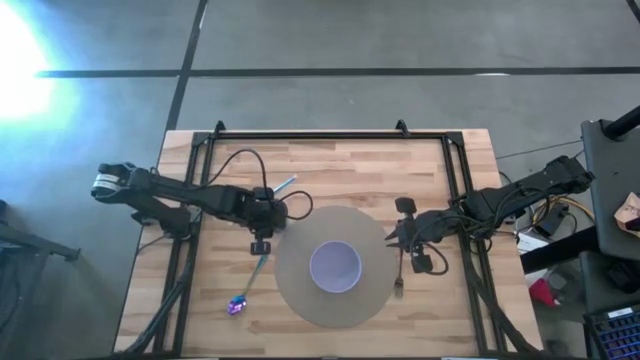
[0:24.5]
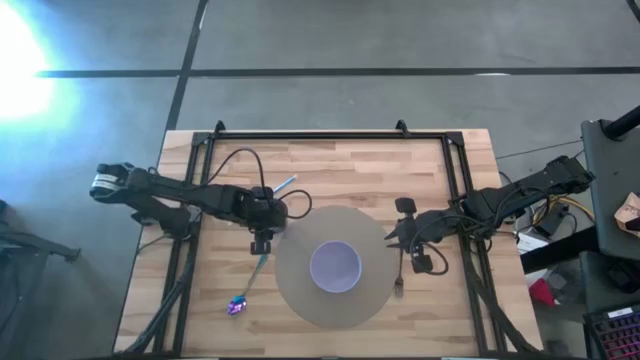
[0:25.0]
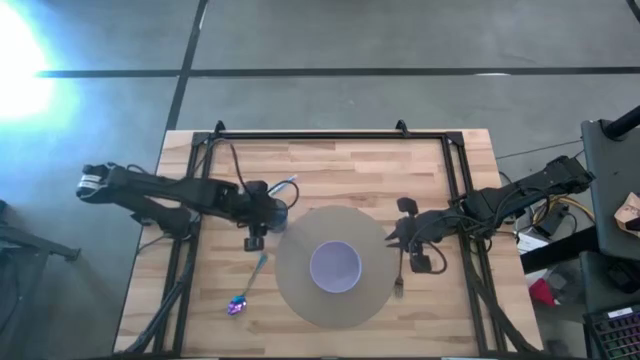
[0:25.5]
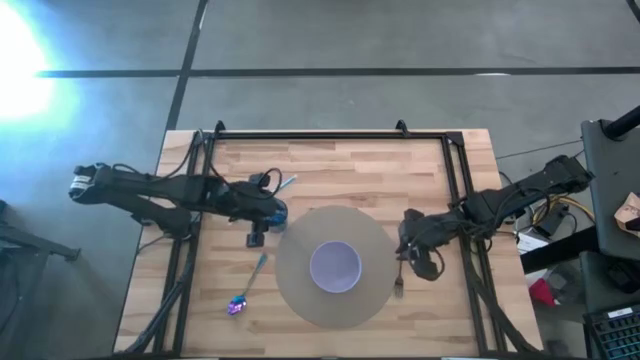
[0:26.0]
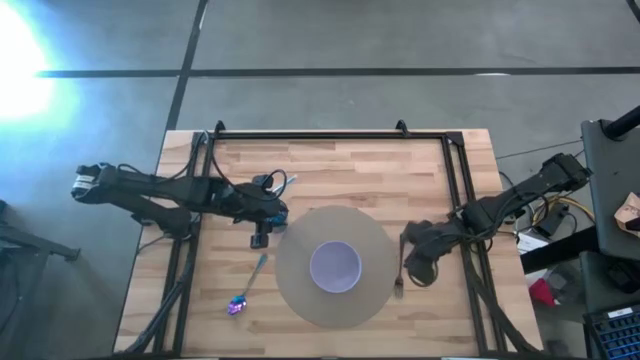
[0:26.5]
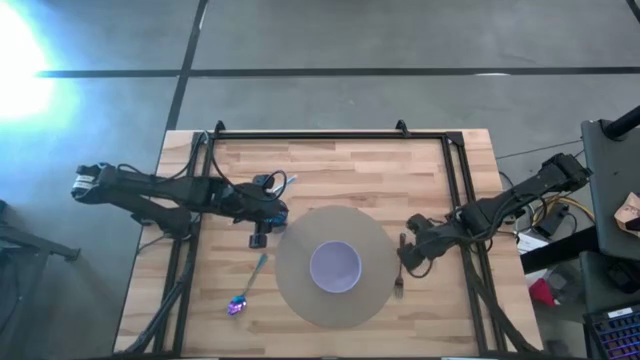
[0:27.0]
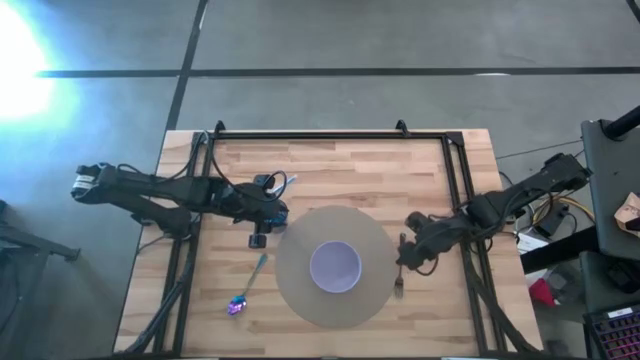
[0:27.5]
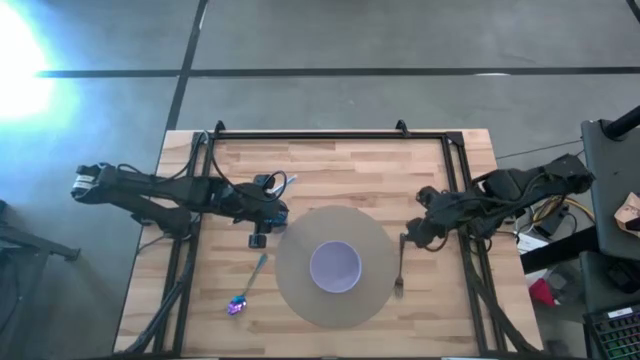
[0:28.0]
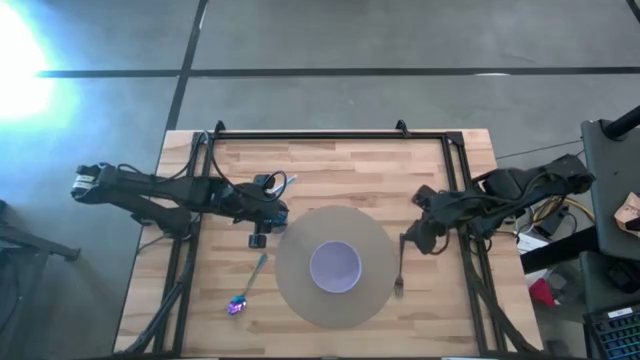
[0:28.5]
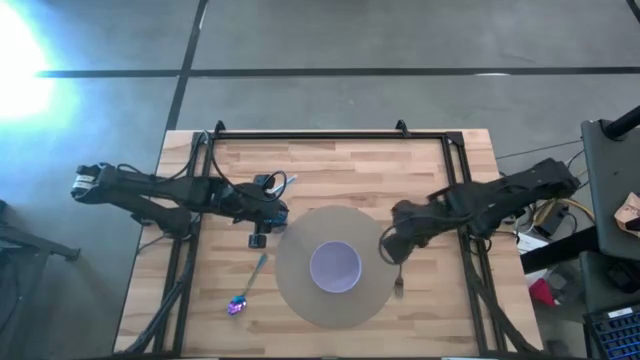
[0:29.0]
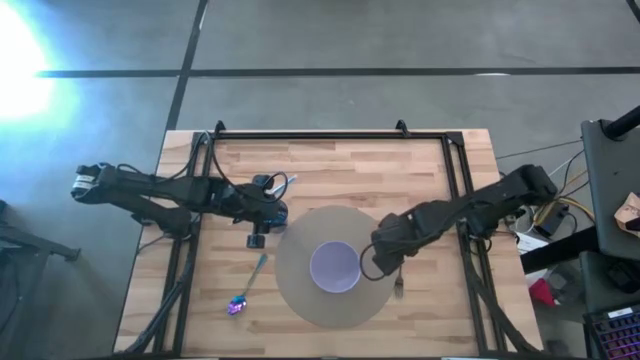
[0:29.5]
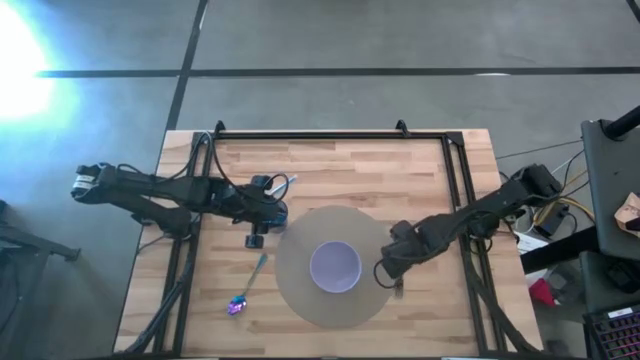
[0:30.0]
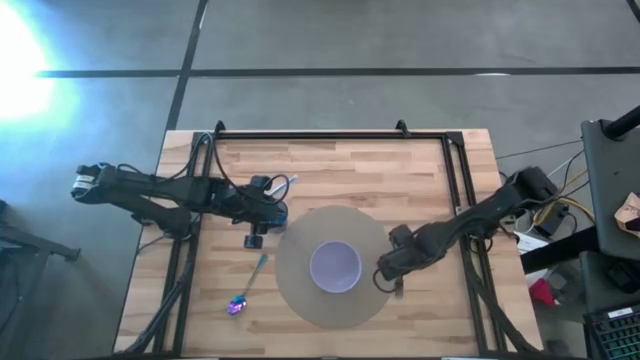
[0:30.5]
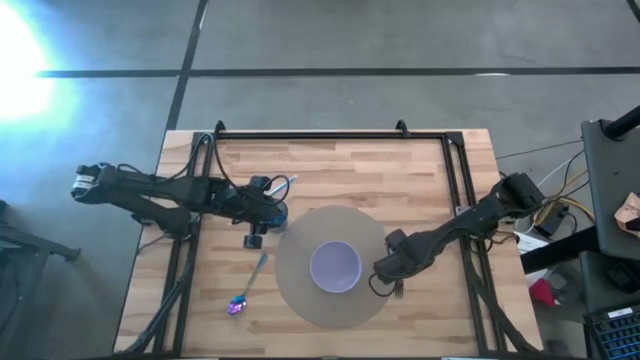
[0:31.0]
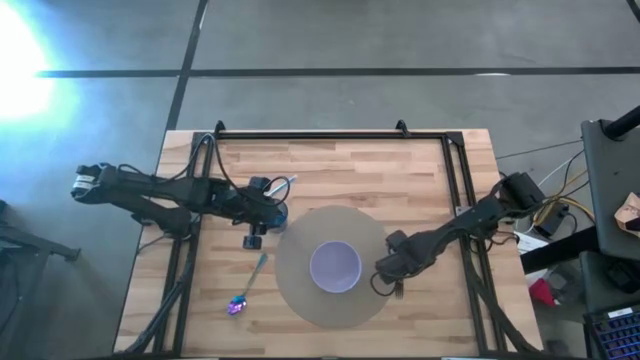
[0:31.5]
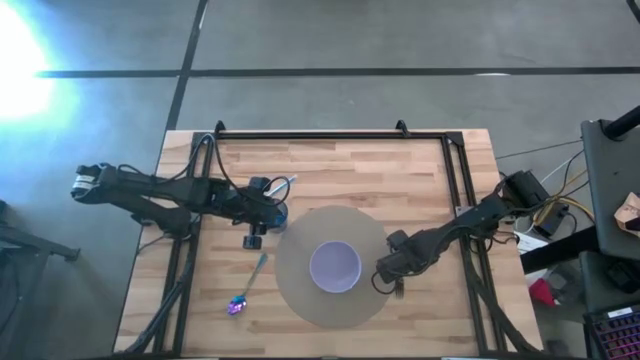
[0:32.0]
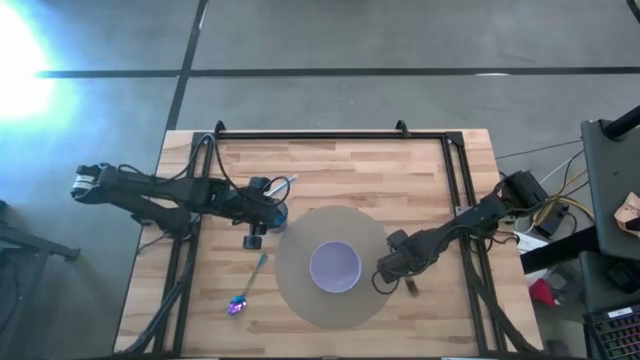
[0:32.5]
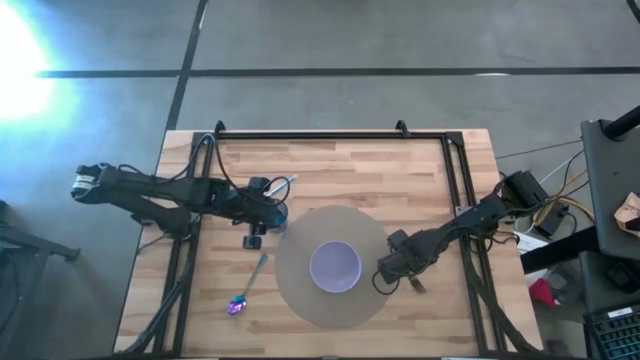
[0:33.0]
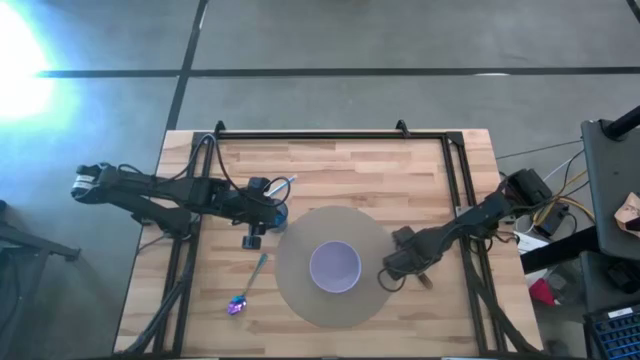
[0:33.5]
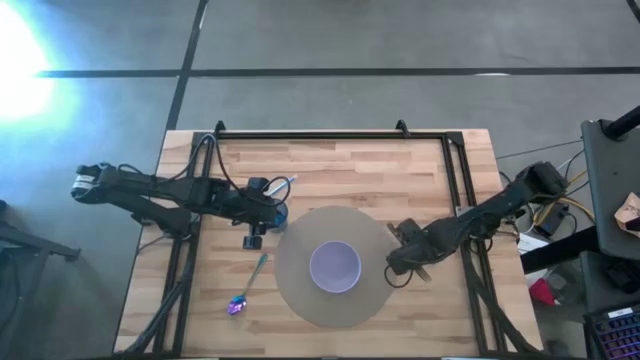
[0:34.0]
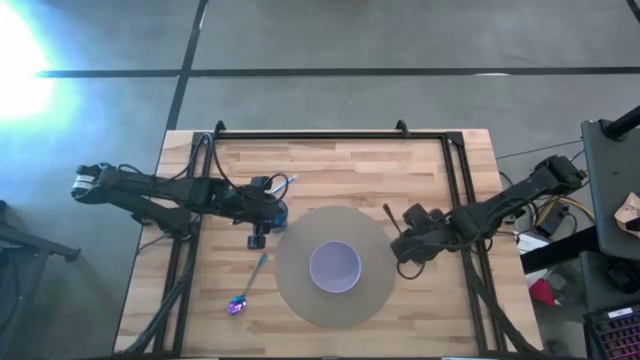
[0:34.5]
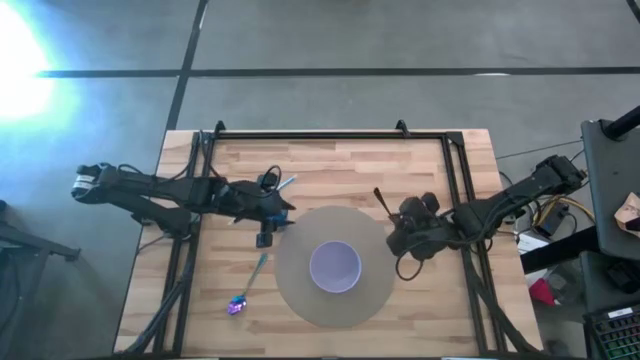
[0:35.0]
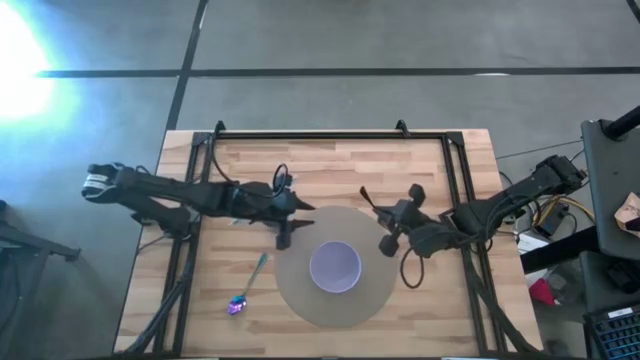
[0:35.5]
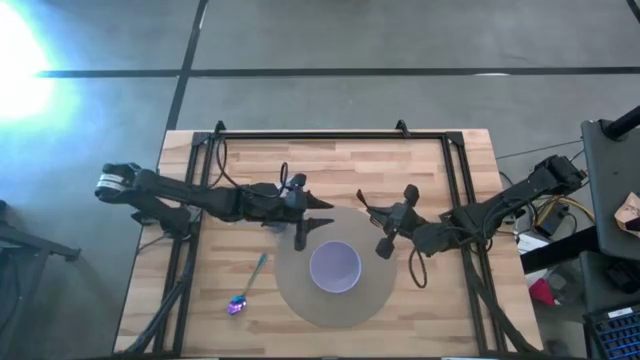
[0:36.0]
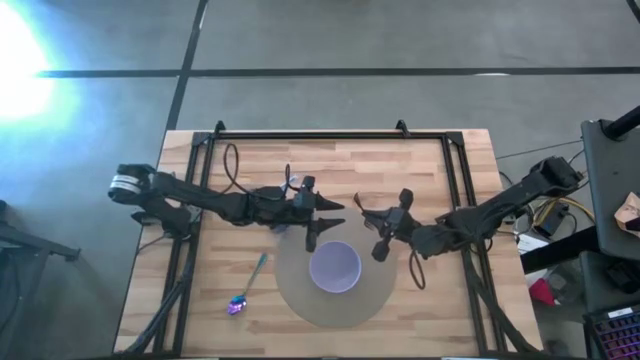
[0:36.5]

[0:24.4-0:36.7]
Task: Pick & Place Utensil
Put the black fork into the violet bowl

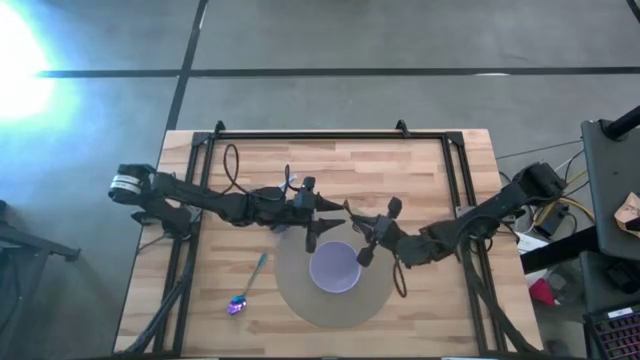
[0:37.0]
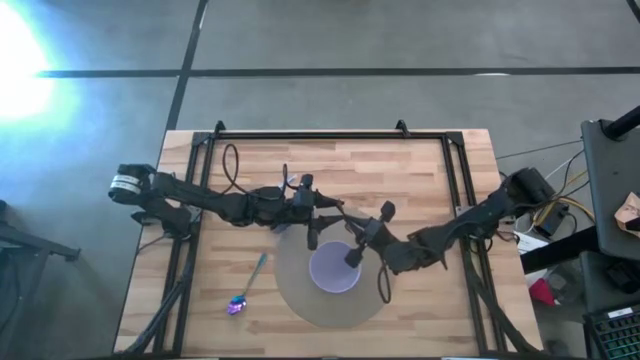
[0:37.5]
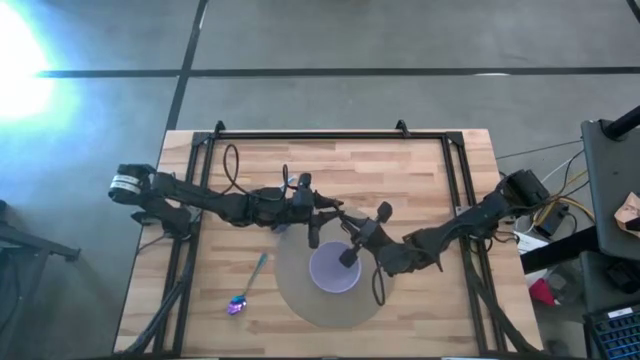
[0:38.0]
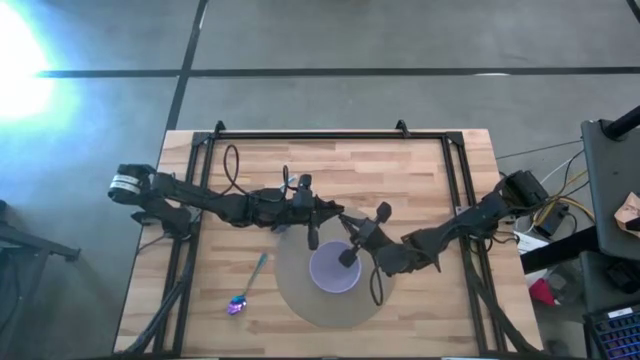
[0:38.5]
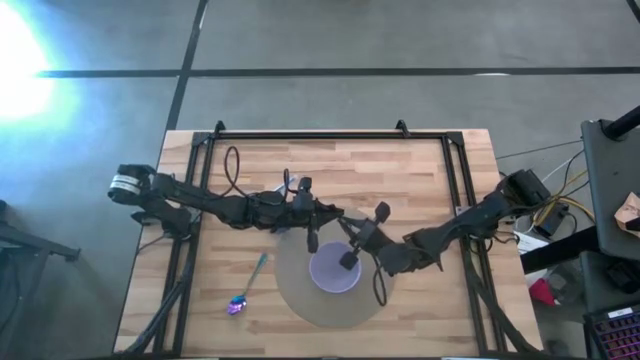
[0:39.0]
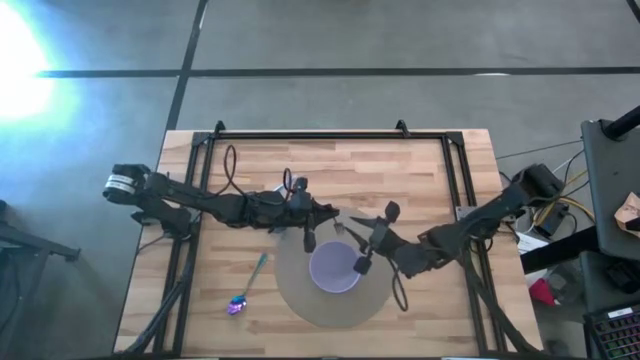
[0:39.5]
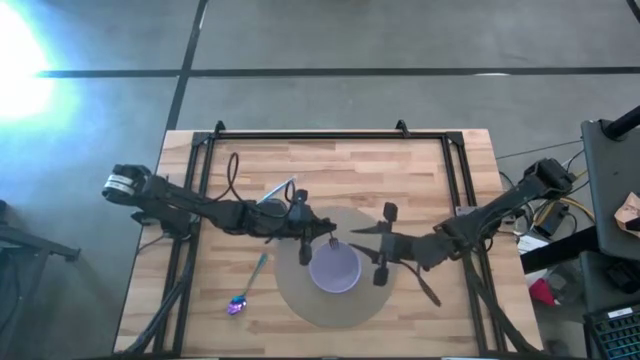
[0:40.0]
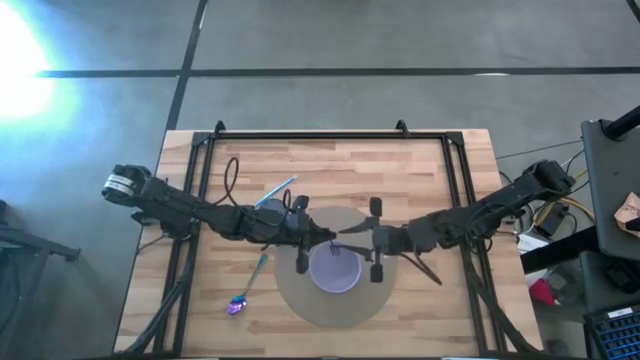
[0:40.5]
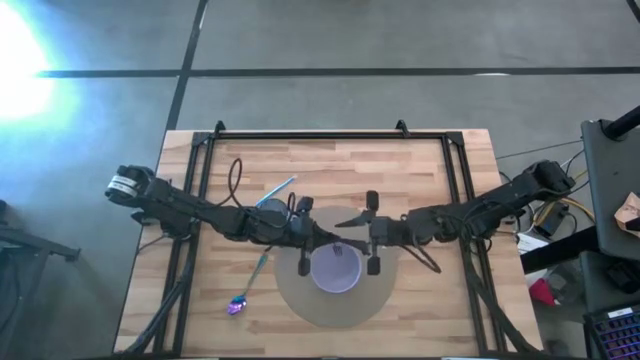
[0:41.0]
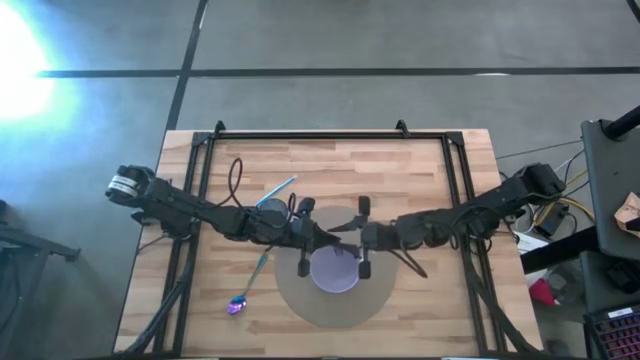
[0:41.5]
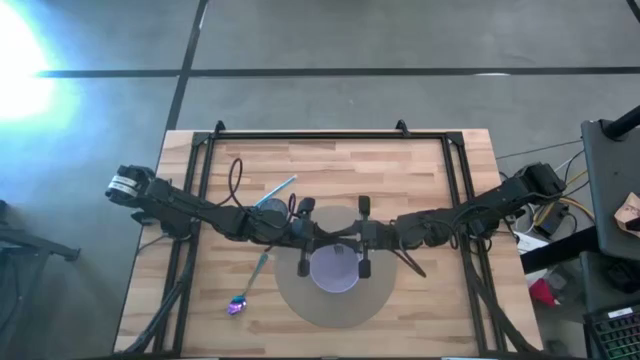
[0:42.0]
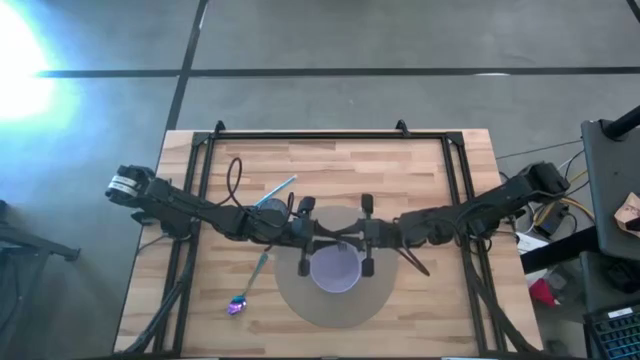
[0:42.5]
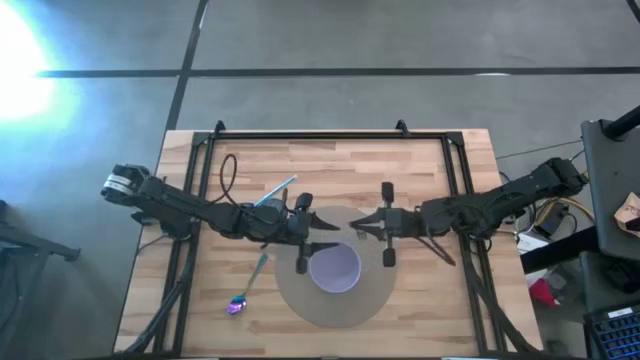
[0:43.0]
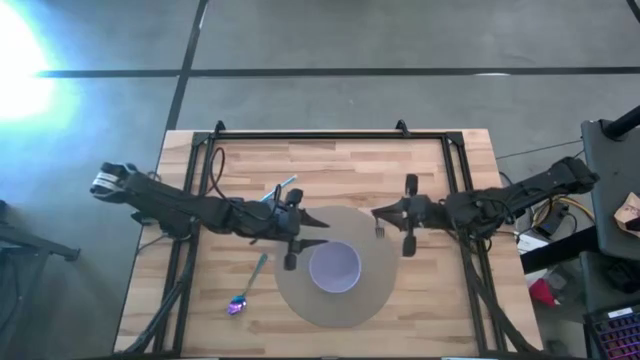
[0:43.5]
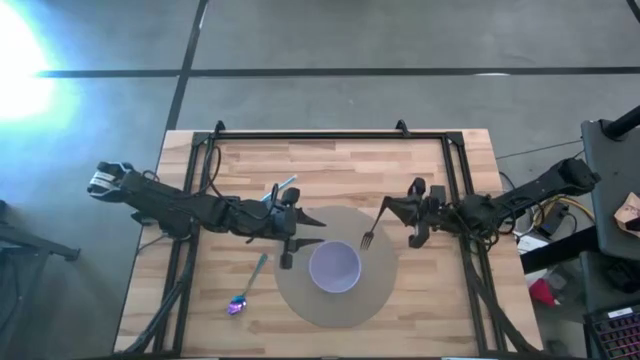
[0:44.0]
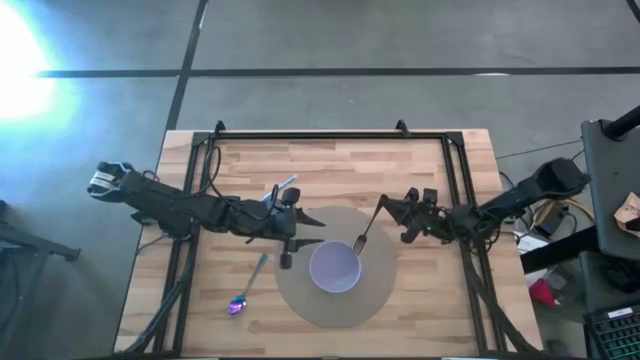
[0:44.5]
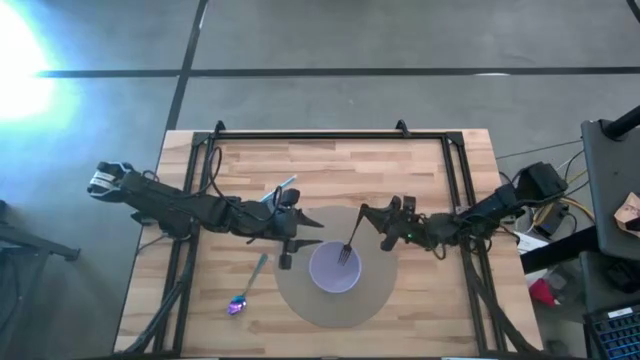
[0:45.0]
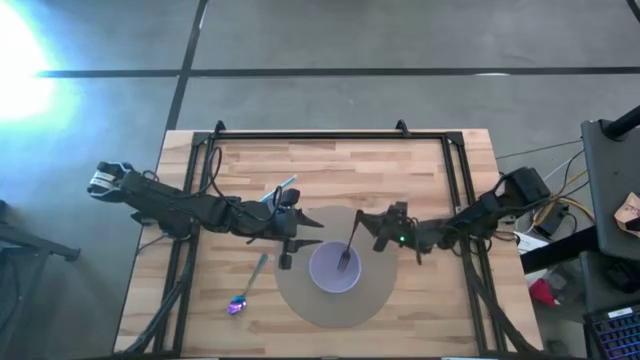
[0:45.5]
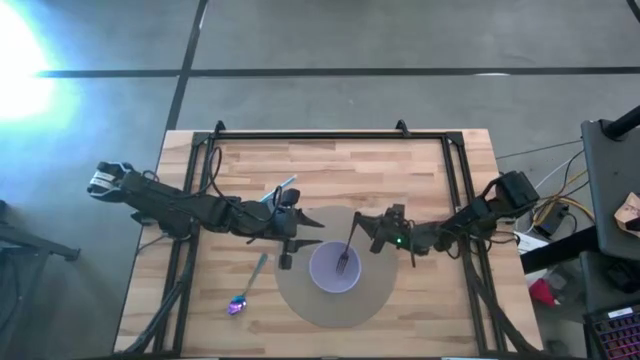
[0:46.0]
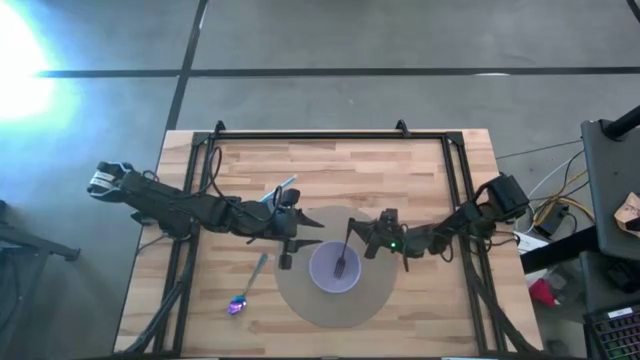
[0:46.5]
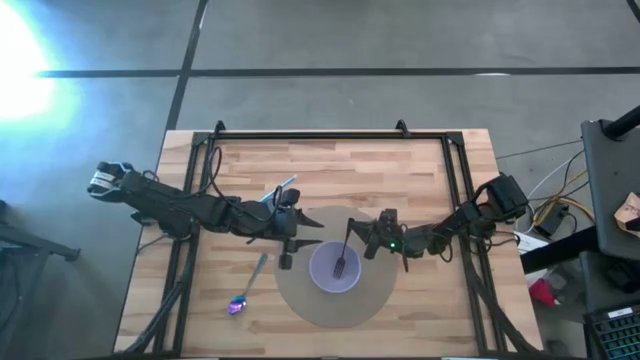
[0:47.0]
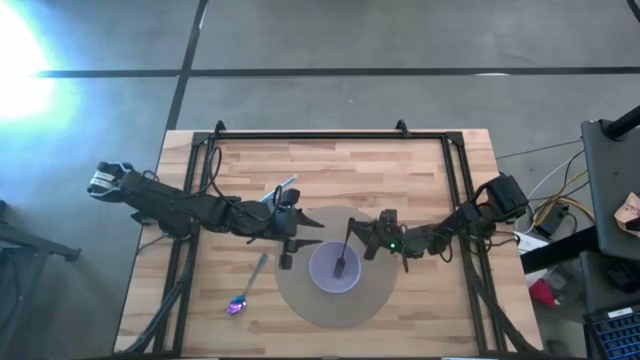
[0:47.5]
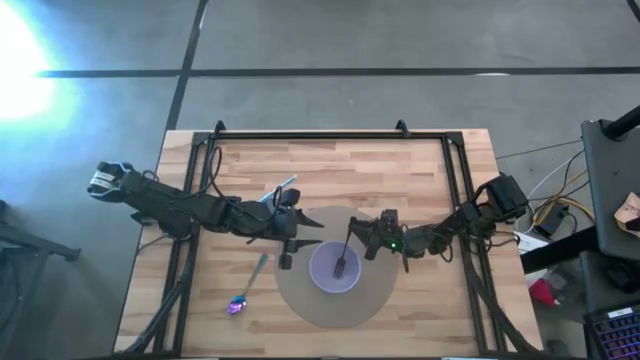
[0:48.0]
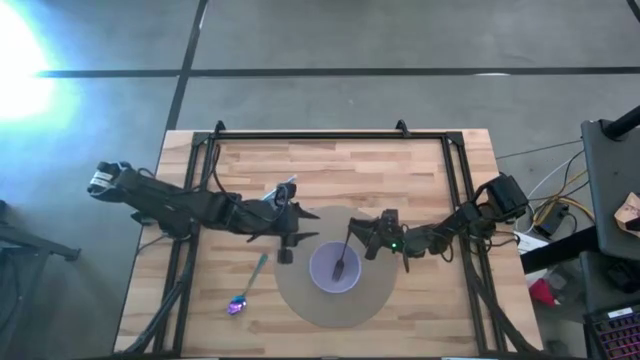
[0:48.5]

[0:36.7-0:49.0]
Put the black fork into the violet bowl
